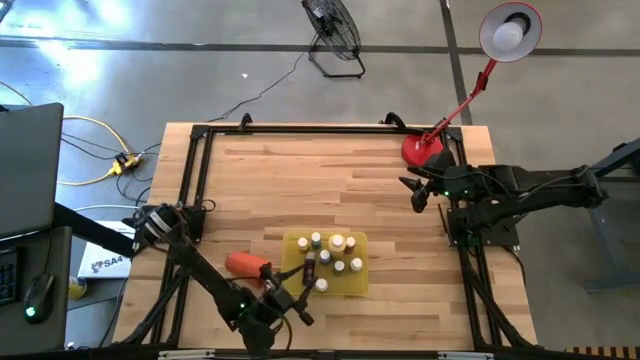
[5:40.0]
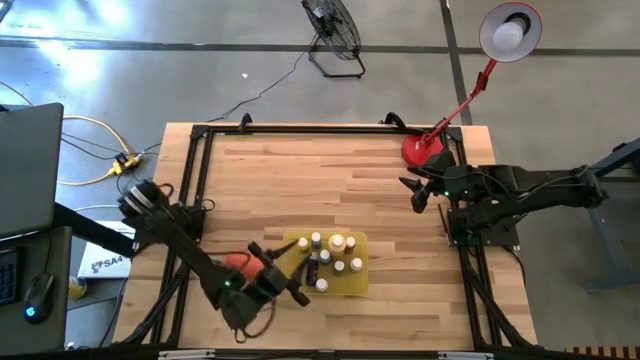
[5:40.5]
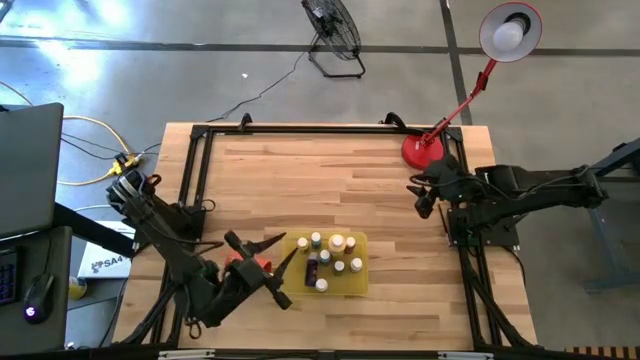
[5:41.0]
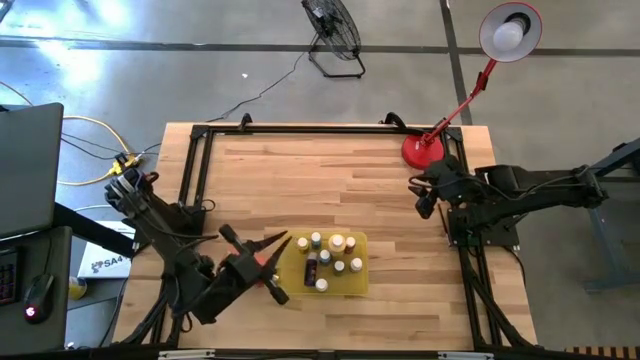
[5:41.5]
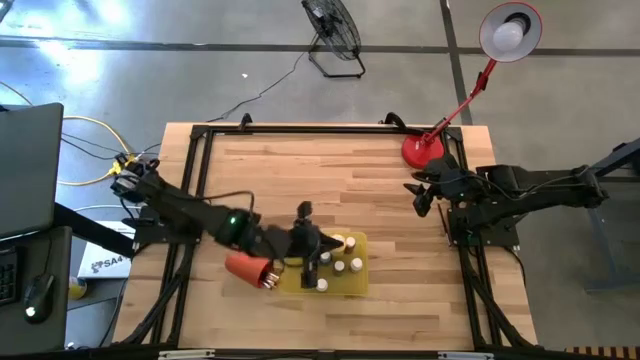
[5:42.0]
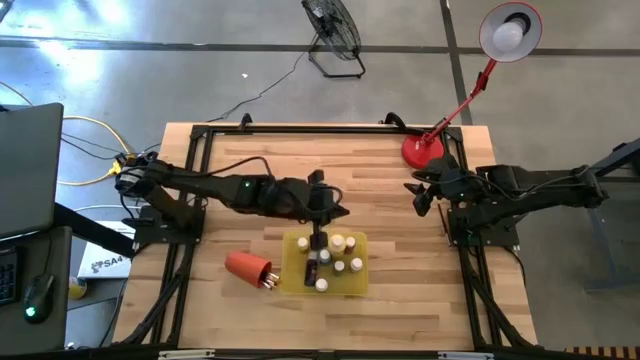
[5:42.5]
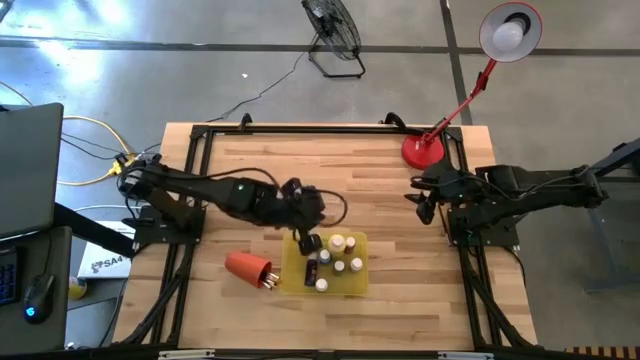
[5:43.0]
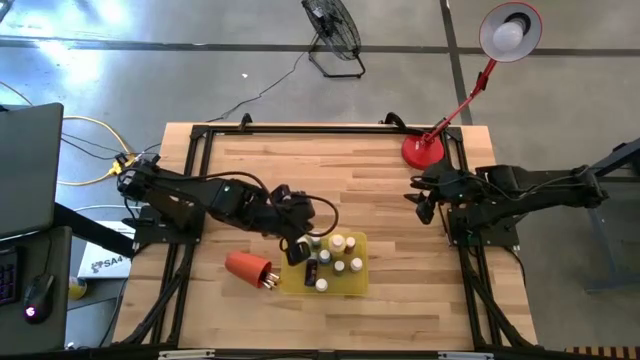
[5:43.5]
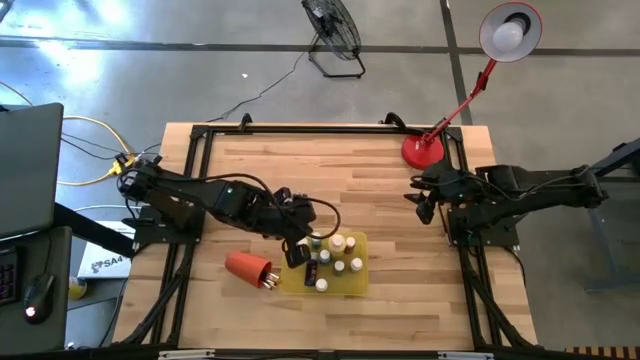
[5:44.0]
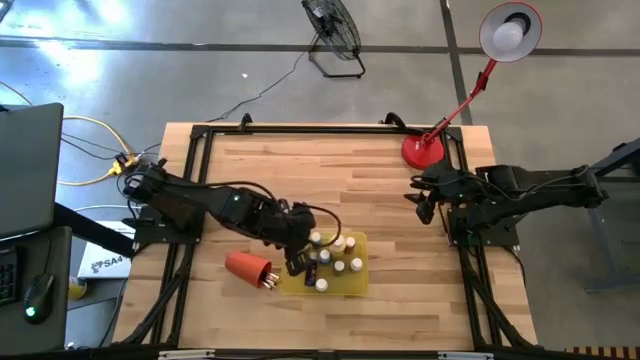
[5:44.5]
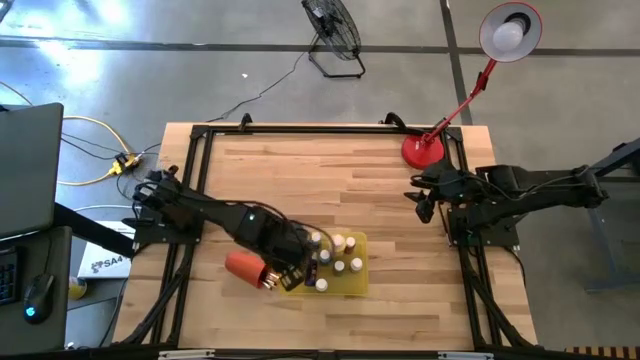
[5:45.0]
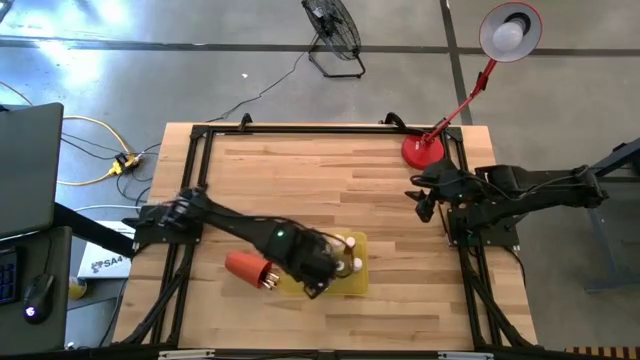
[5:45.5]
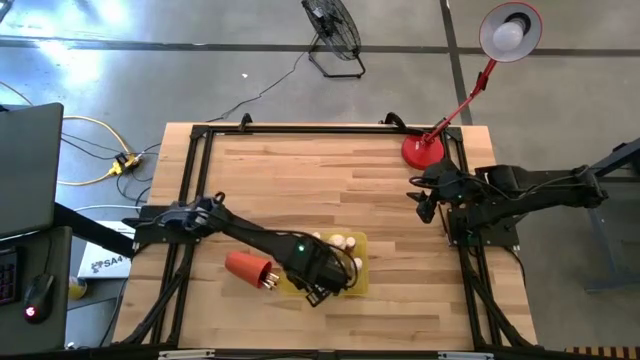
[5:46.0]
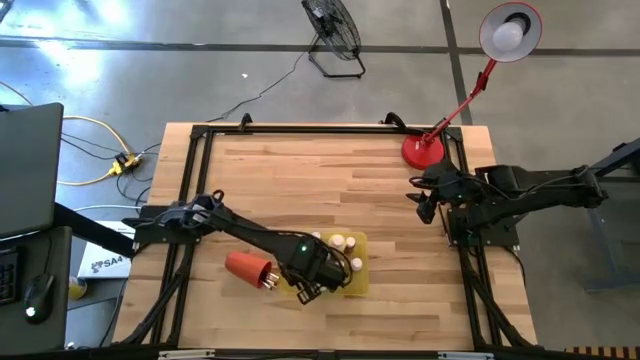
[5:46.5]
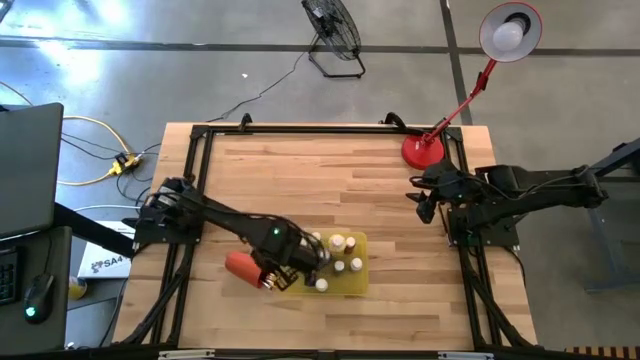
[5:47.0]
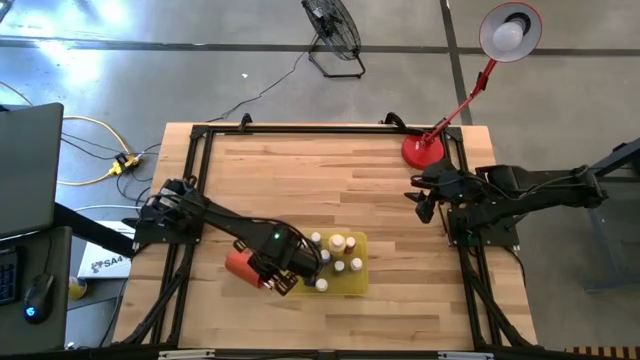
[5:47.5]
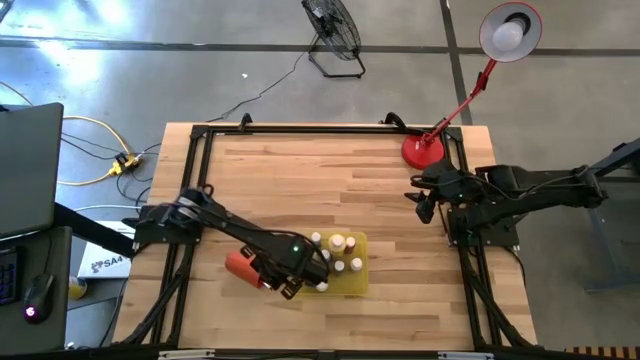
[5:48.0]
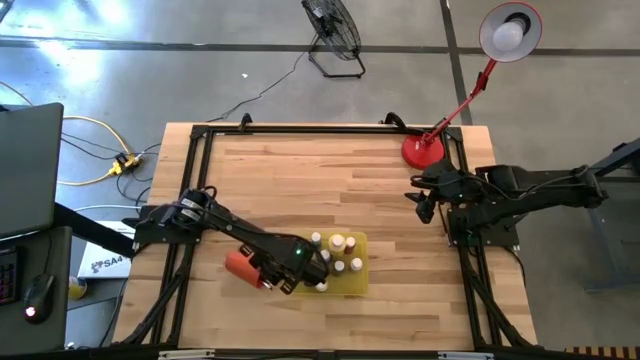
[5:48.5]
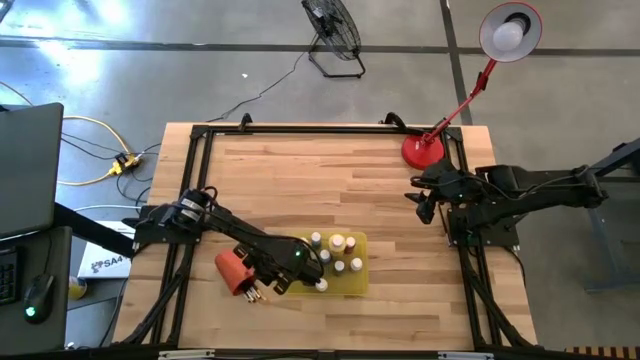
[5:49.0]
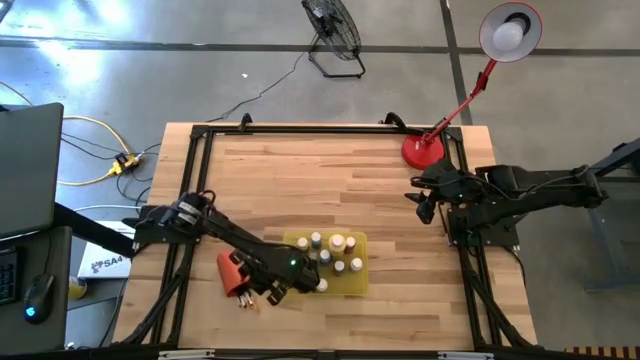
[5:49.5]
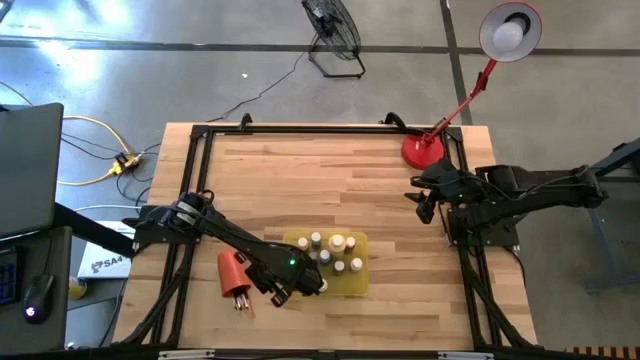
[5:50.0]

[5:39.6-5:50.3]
Task: Pick & Place Paint Supplies
Adjust the orange cup

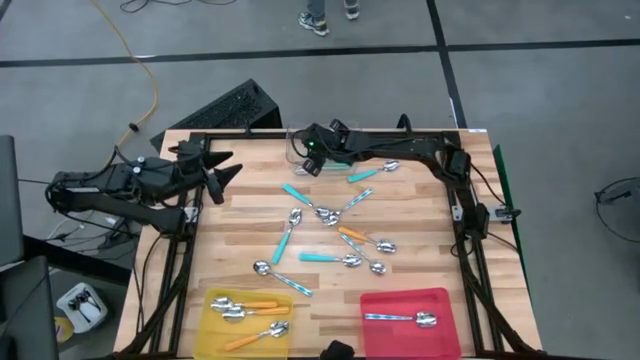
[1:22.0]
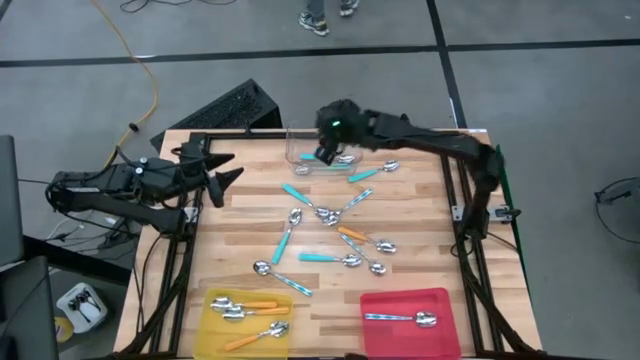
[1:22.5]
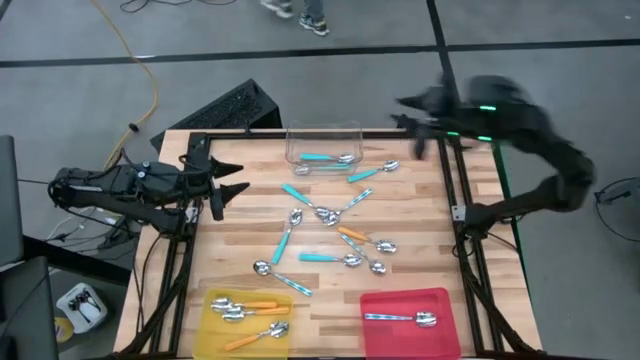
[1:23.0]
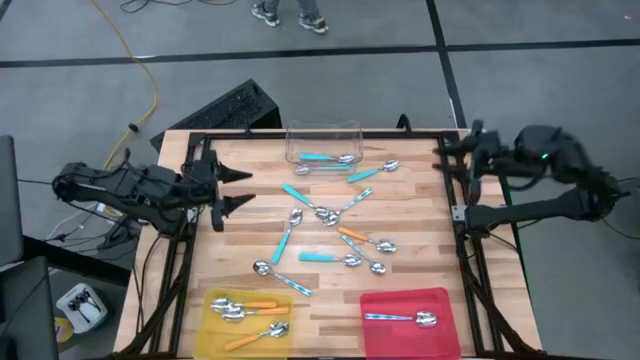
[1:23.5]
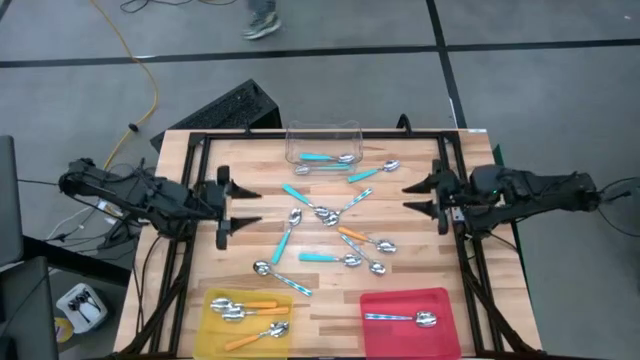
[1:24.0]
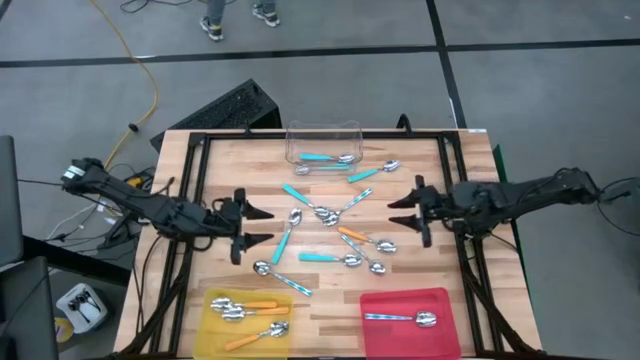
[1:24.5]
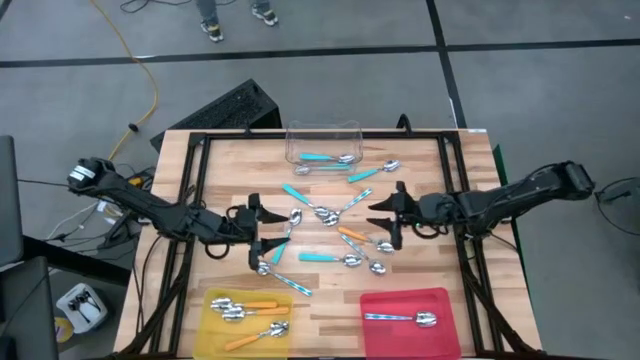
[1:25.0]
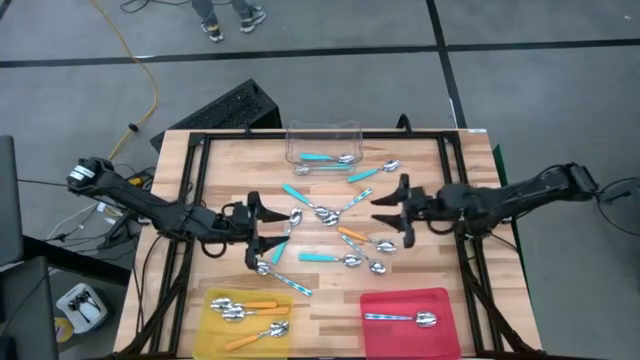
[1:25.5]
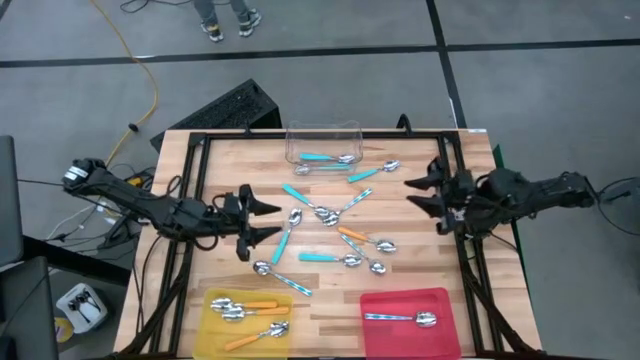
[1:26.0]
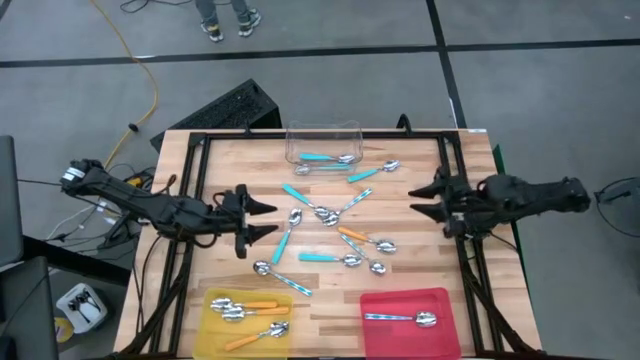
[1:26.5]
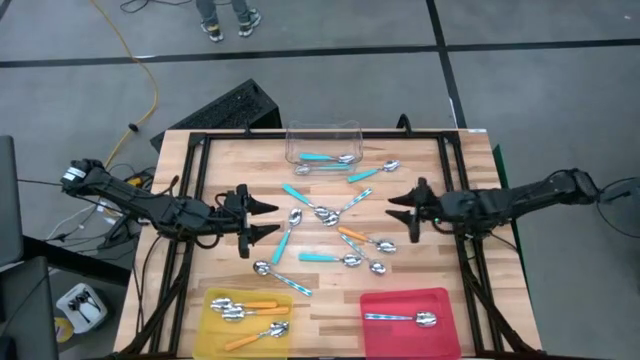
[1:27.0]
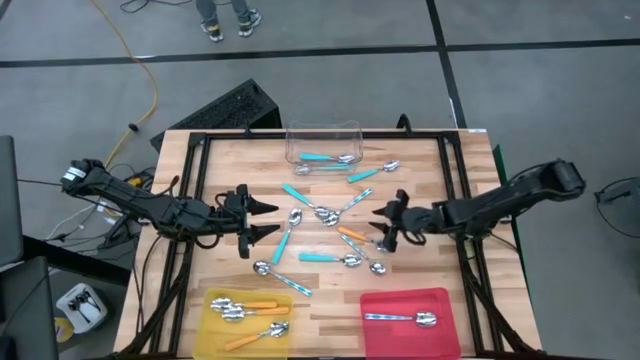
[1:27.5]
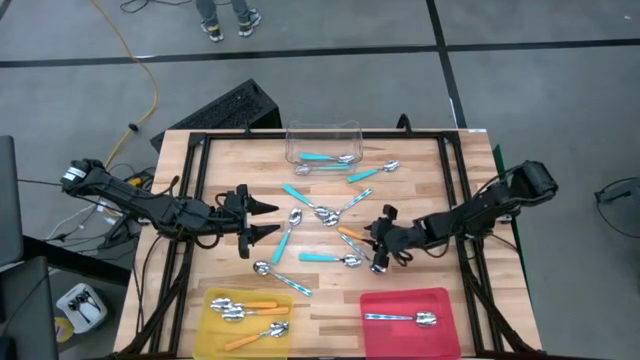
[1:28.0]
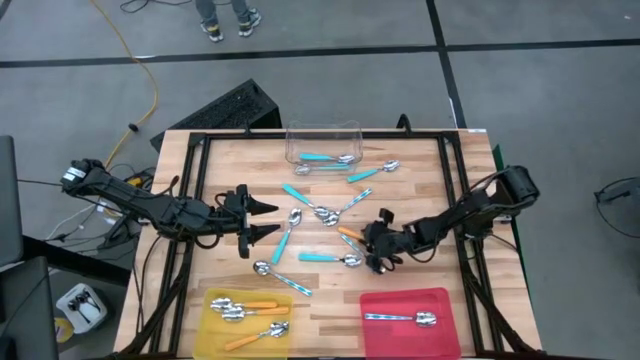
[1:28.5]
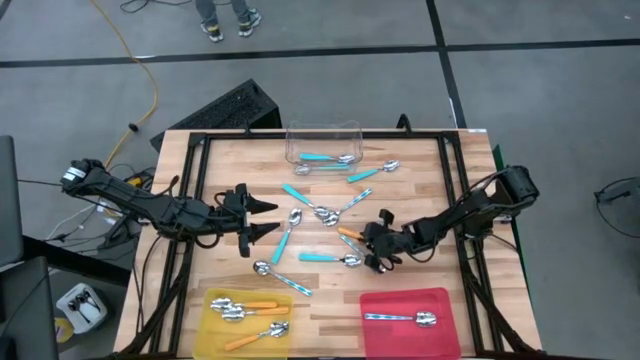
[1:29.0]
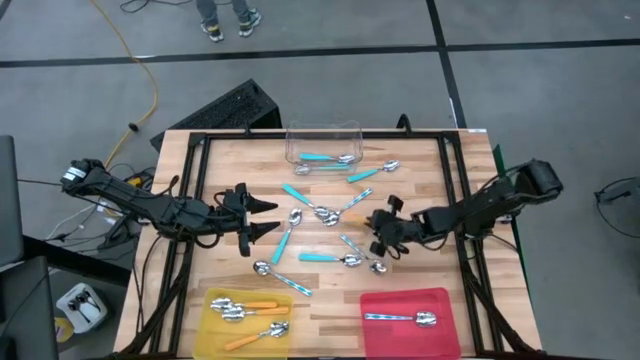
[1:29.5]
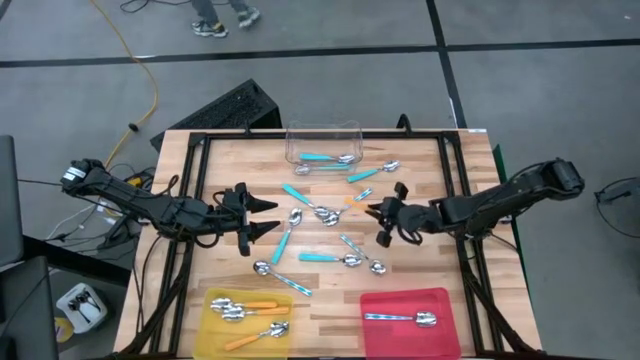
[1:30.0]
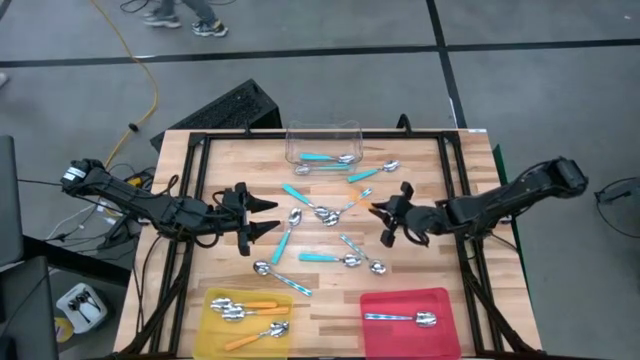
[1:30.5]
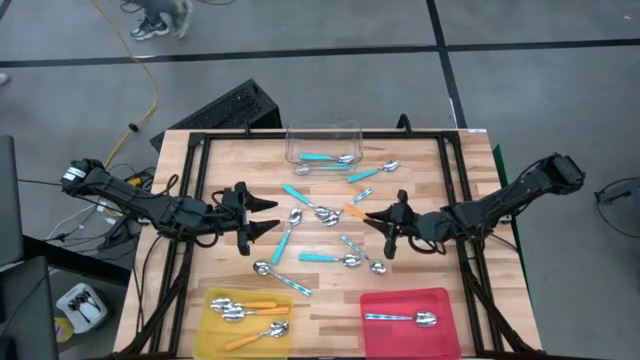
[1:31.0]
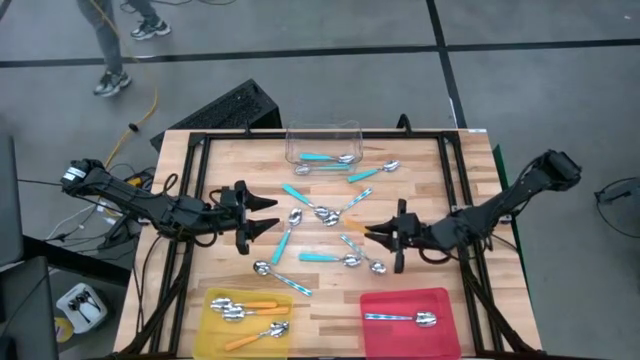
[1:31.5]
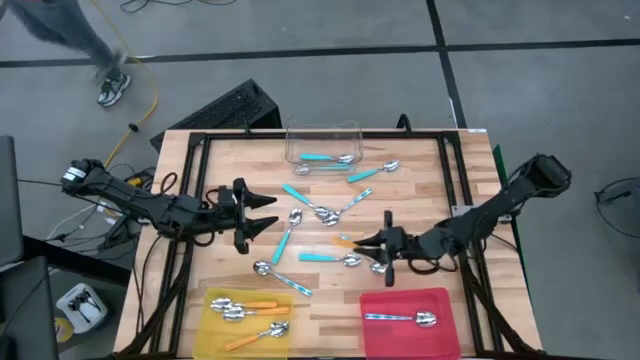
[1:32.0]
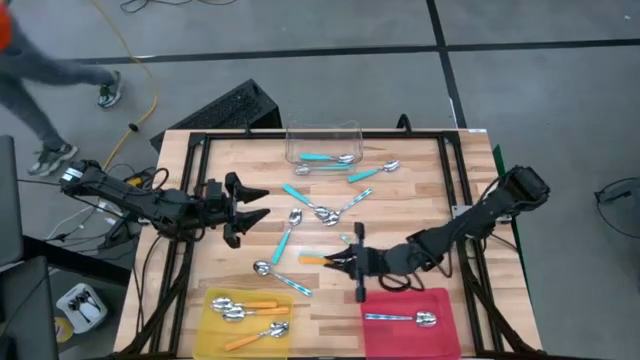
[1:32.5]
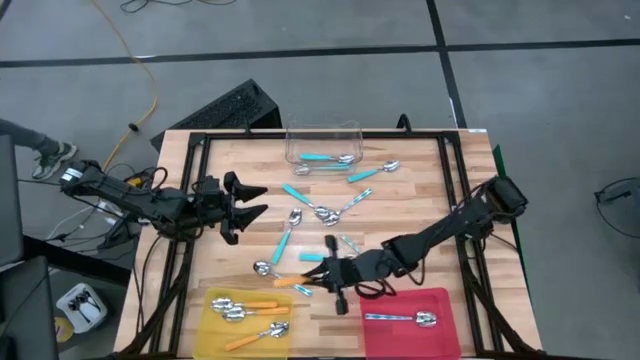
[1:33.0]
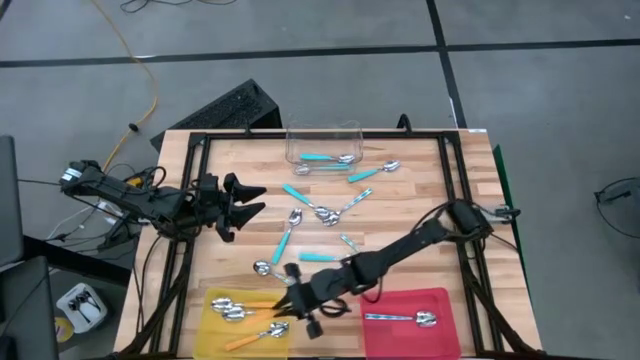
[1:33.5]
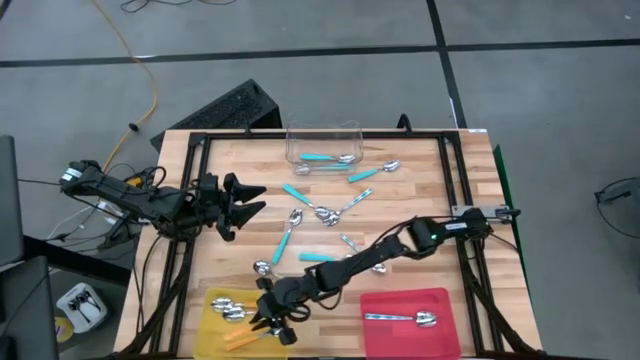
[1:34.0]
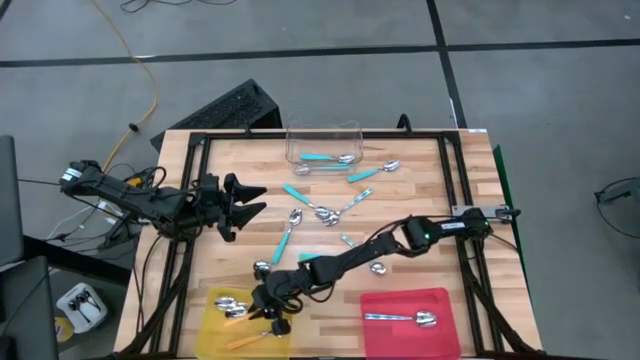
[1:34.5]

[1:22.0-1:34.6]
Task: Sort silverware by color (type)
Put the yellow spoon into the yellow bin
